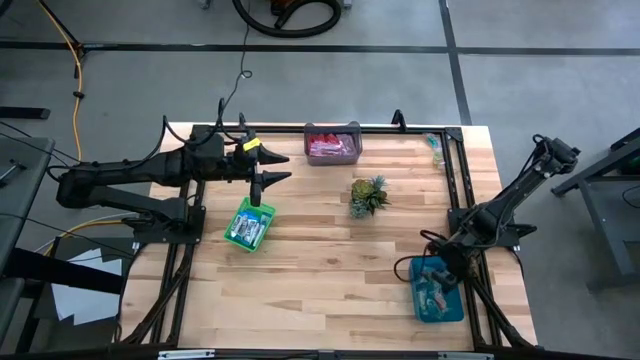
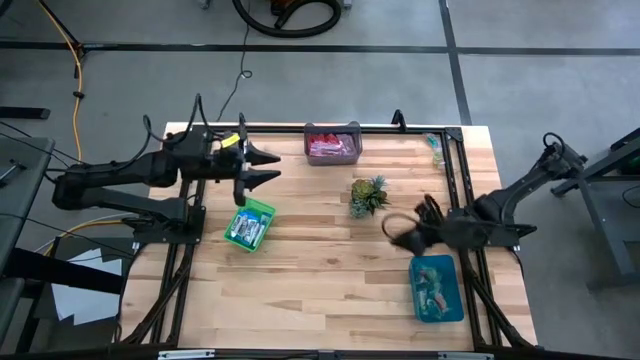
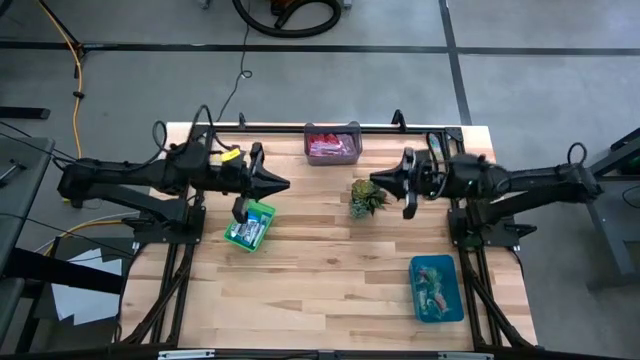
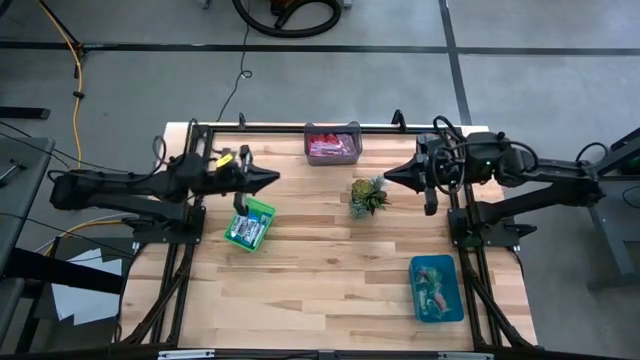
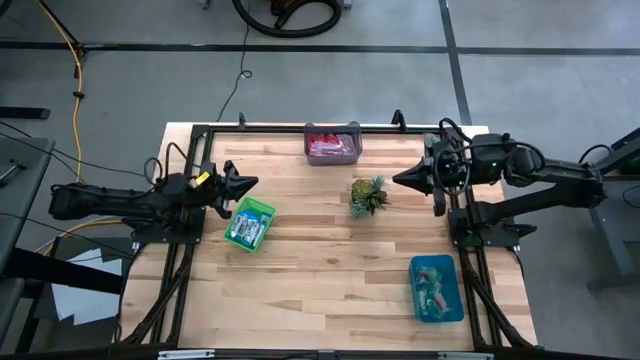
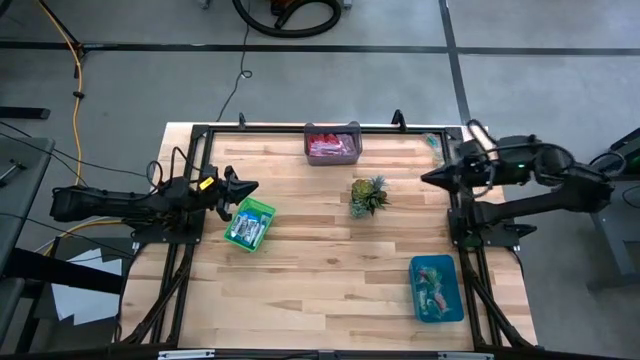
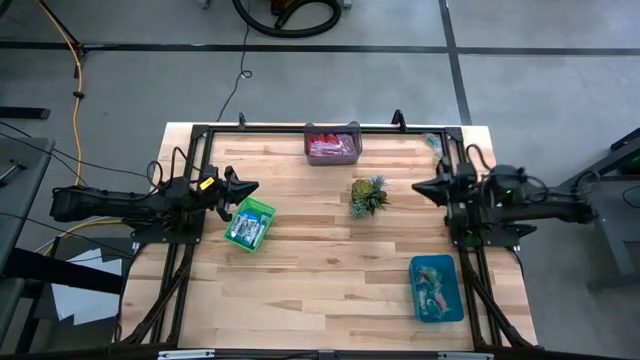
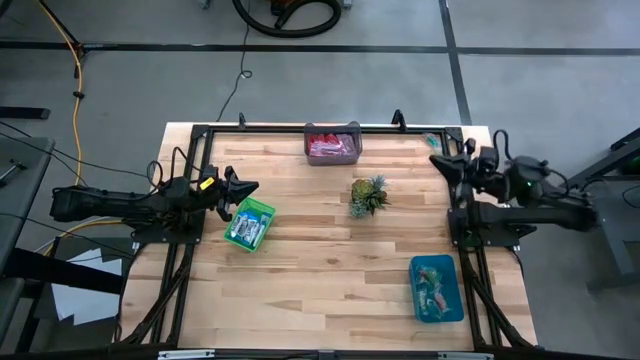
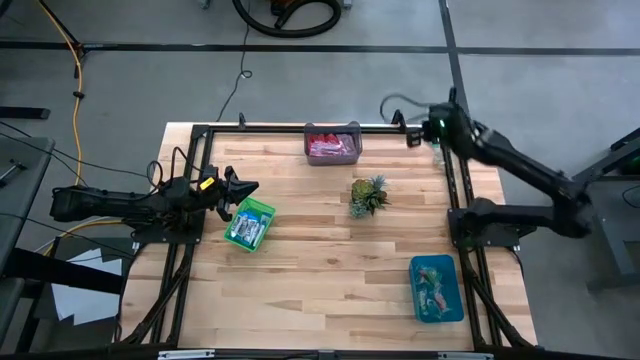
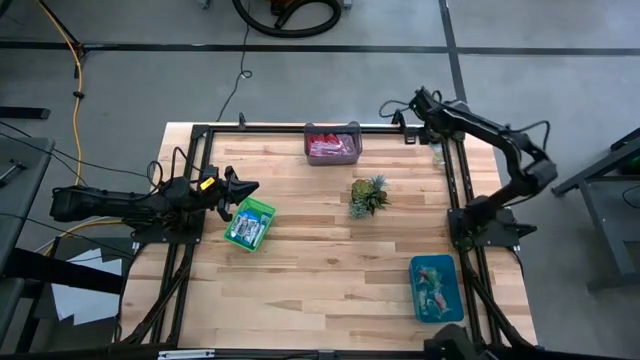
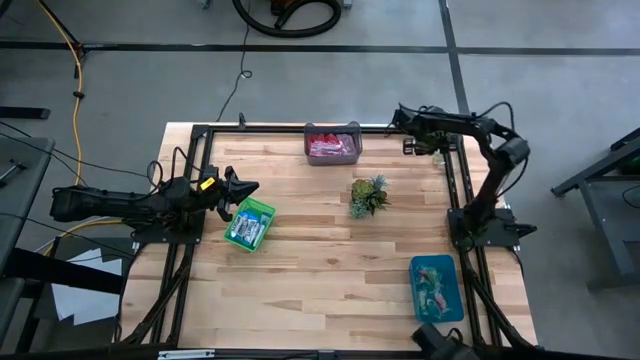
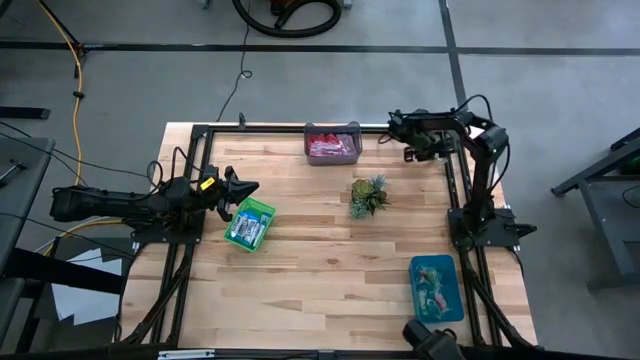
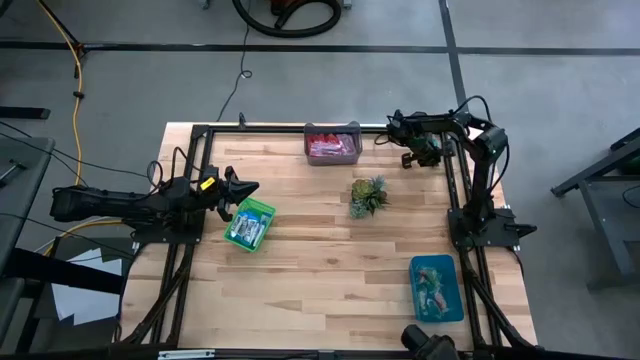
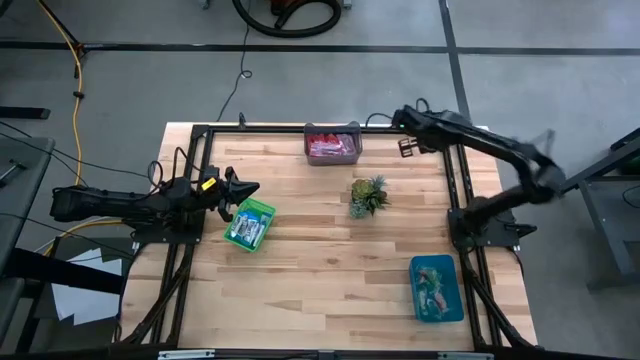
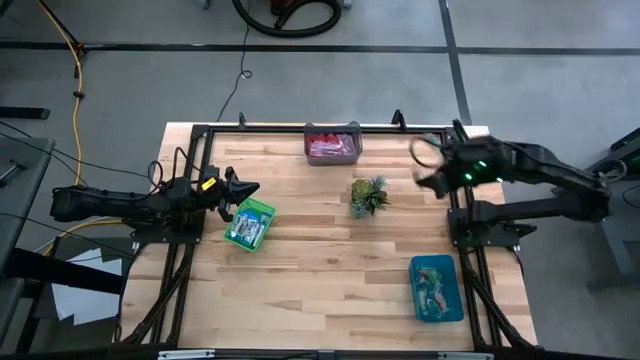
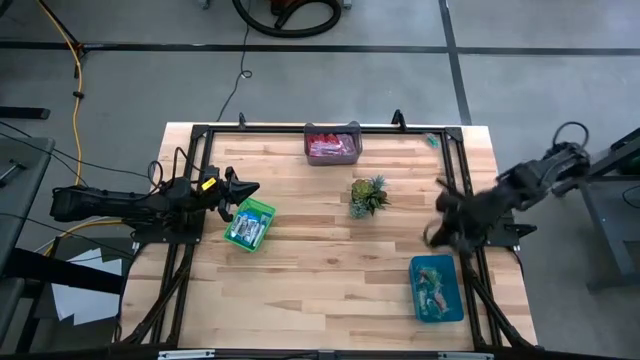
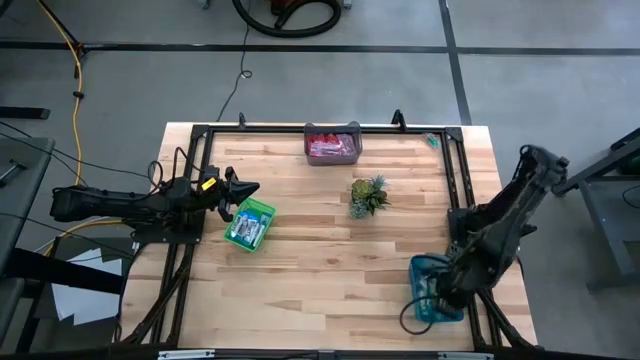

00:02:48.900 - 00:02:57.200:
Task: Sort candy
Put the transparent candy into the blue bin

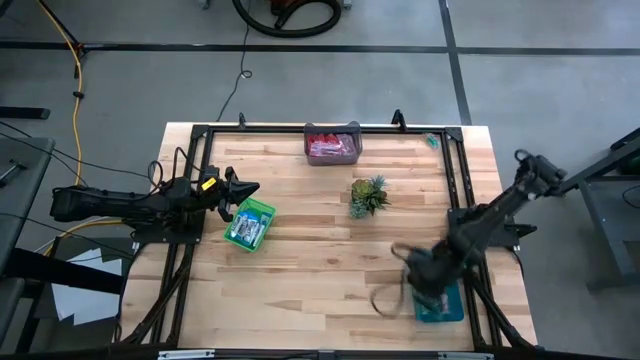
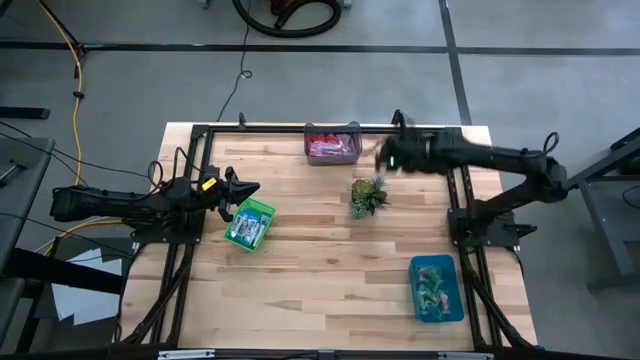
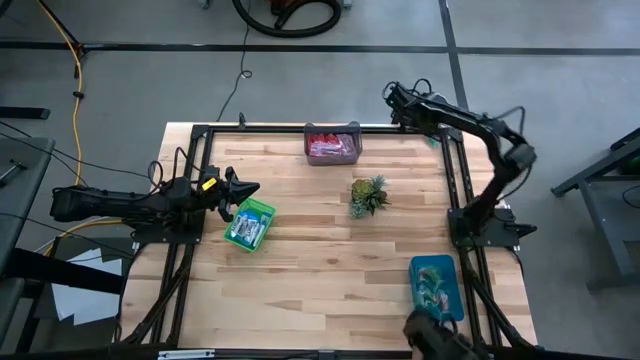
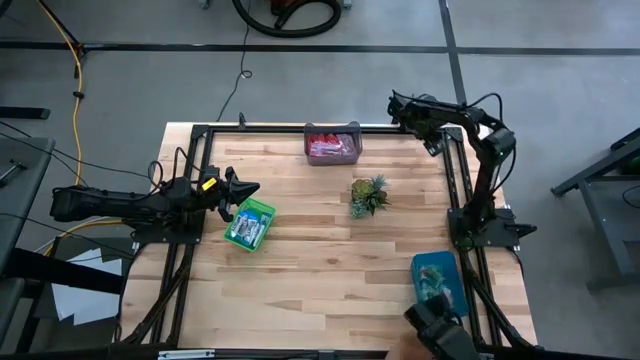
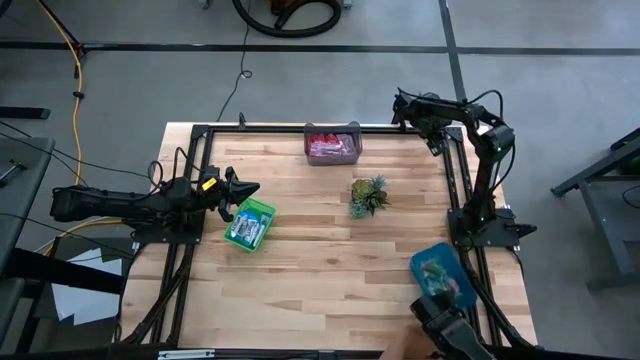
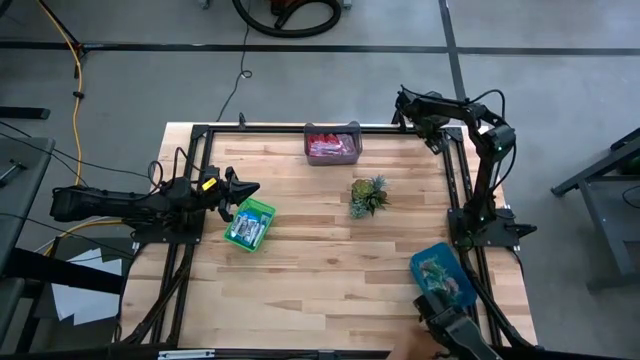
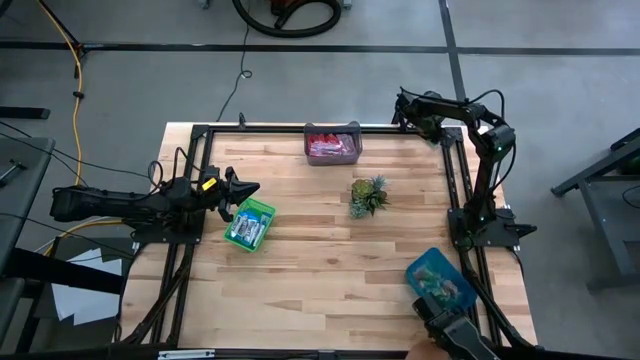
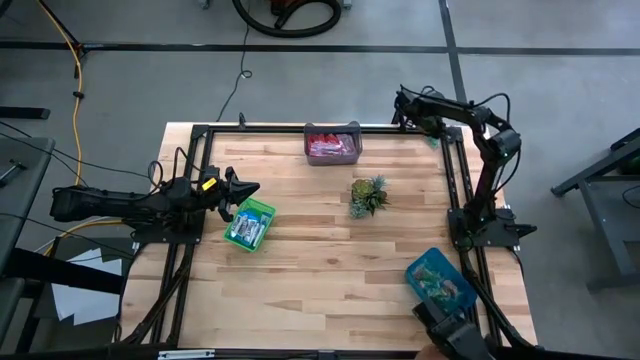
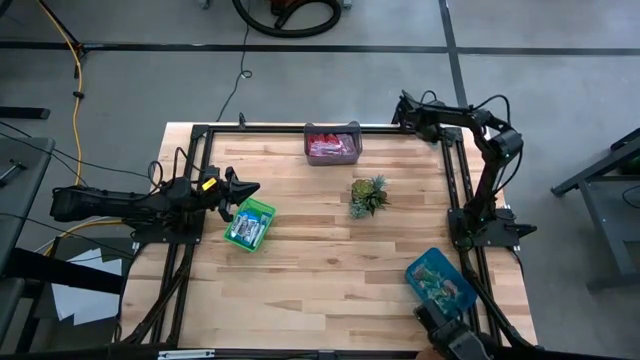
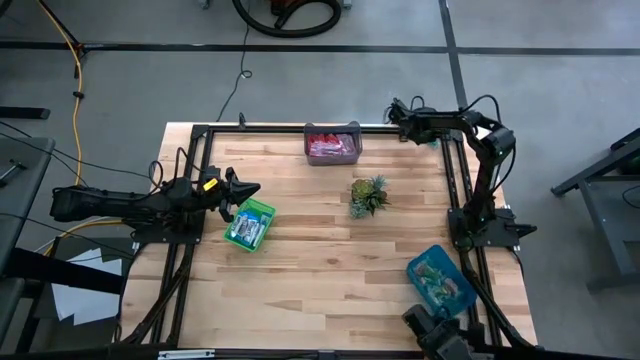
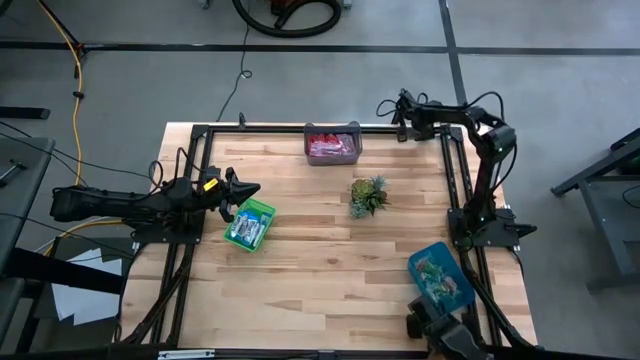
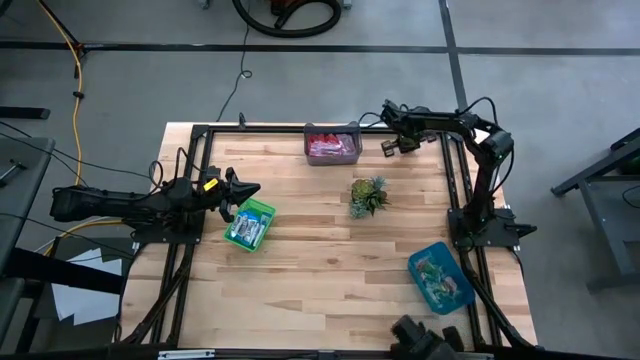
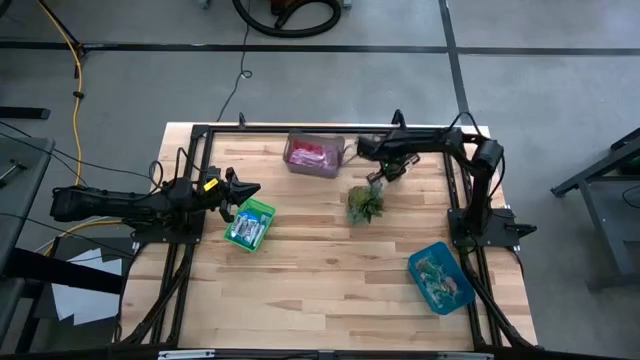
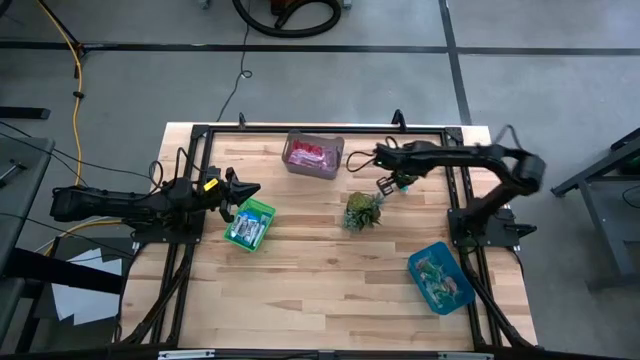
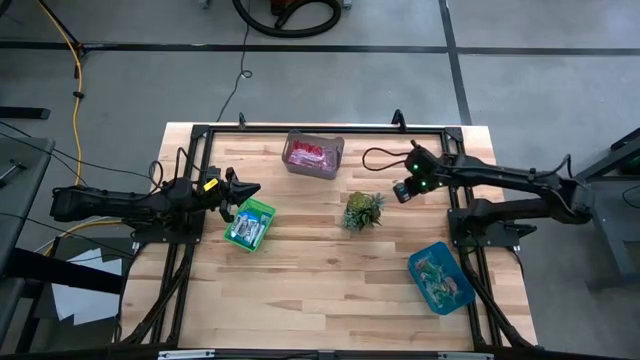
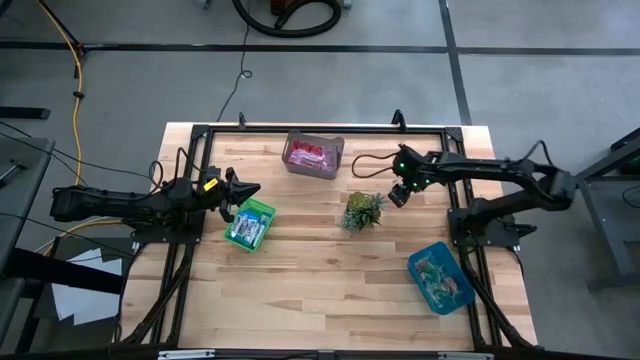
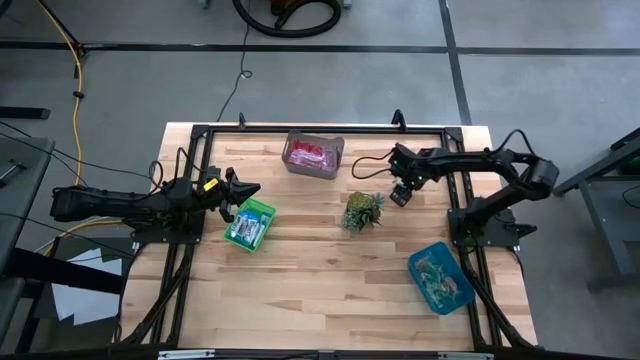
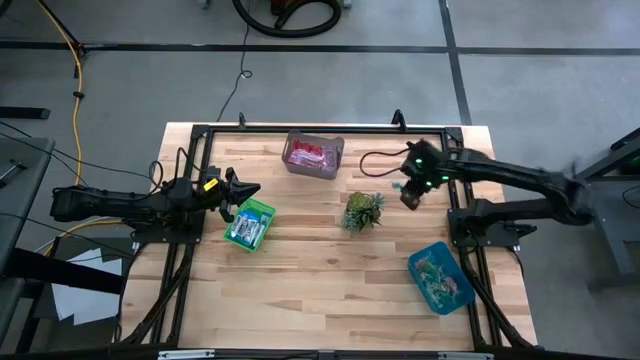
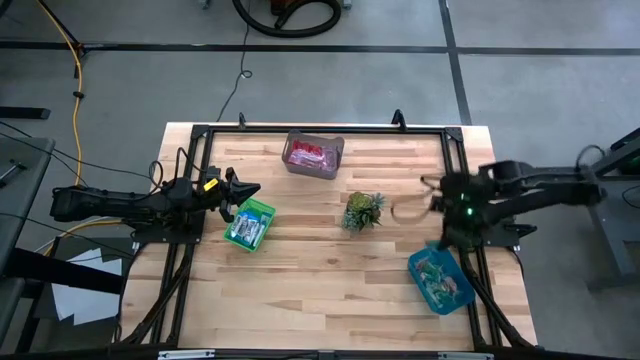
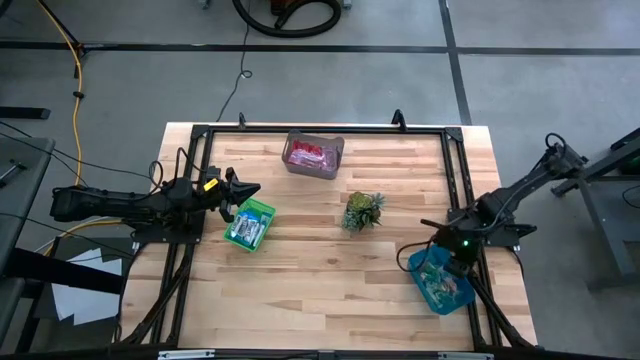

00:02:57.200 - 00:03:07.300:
Put the transparent candy into the blue bin
